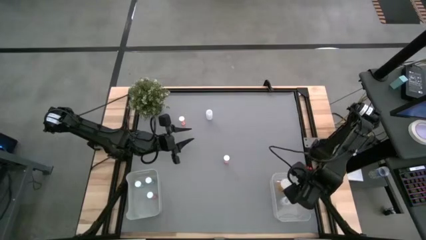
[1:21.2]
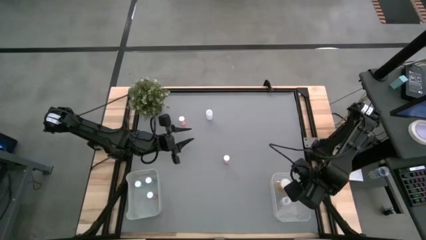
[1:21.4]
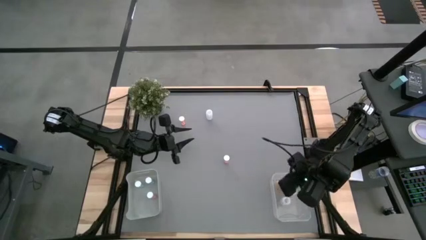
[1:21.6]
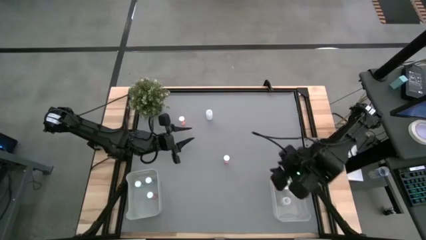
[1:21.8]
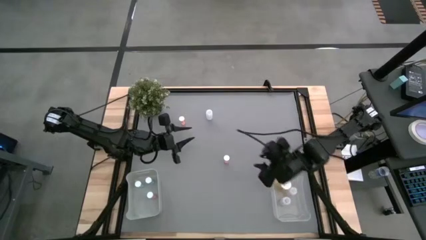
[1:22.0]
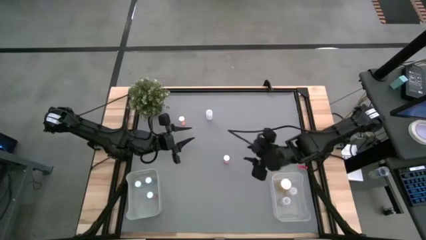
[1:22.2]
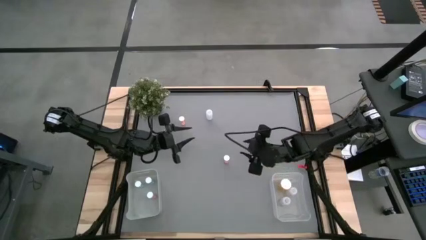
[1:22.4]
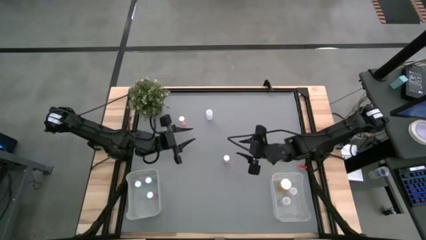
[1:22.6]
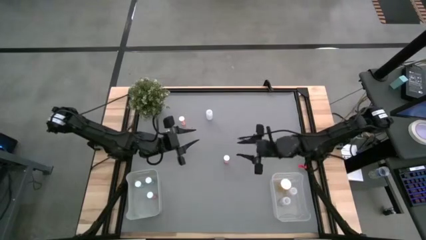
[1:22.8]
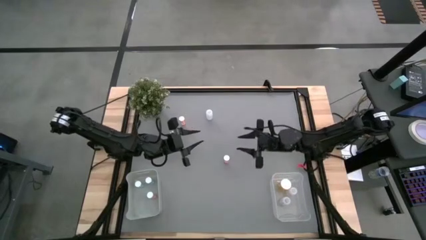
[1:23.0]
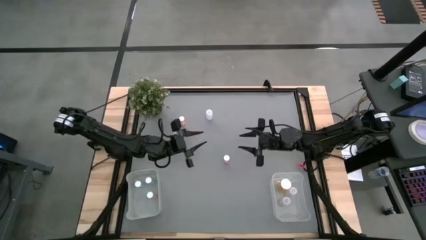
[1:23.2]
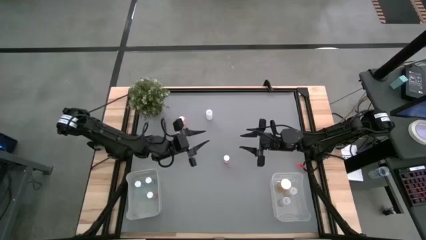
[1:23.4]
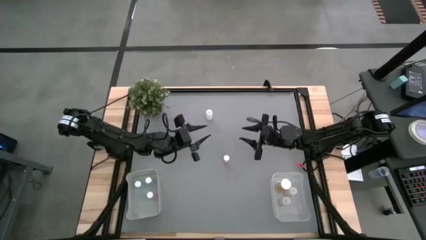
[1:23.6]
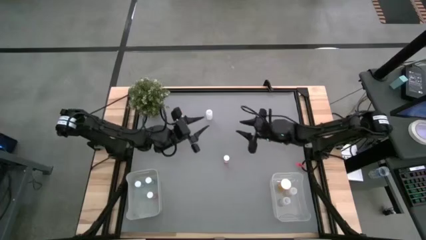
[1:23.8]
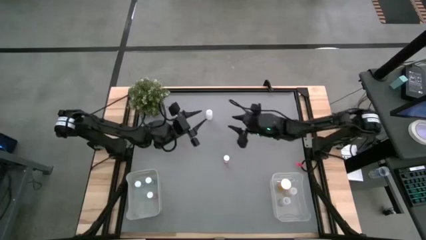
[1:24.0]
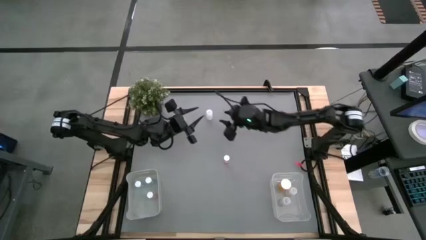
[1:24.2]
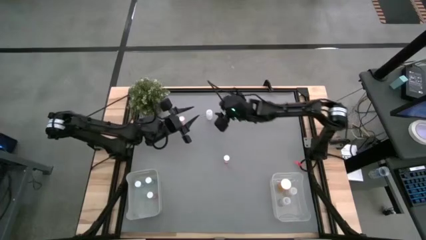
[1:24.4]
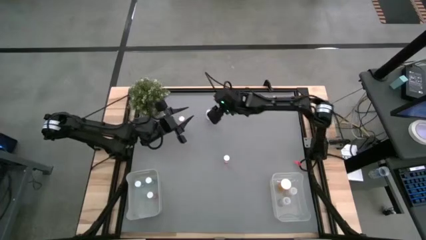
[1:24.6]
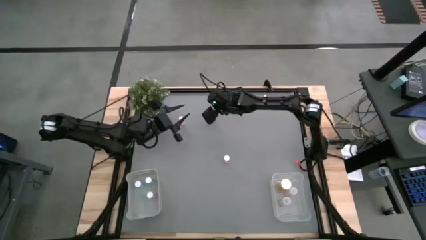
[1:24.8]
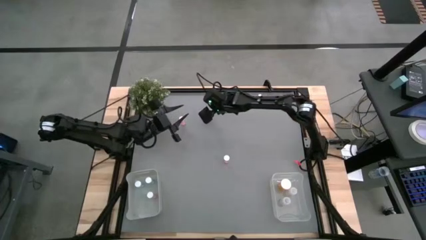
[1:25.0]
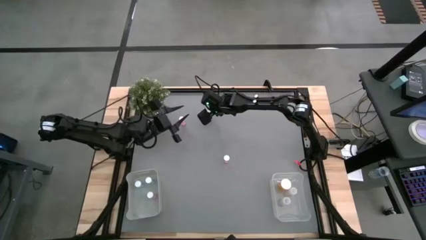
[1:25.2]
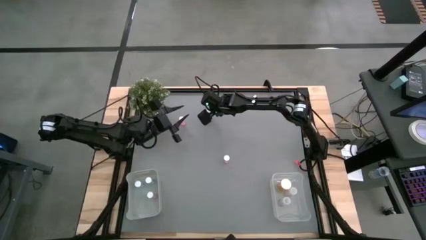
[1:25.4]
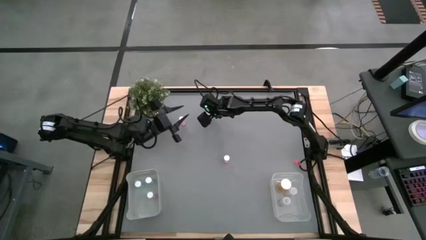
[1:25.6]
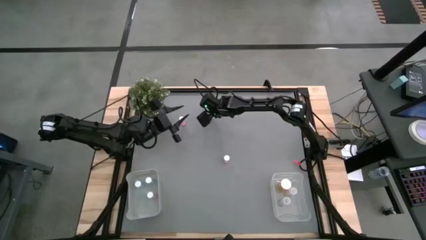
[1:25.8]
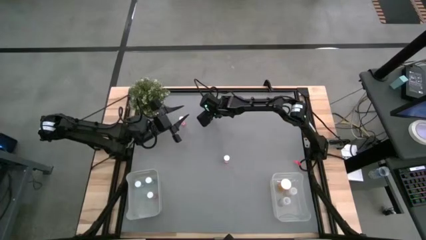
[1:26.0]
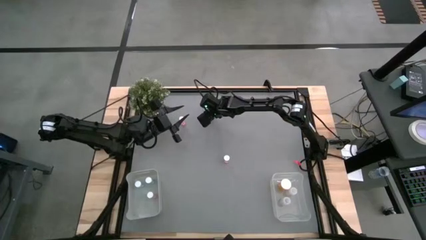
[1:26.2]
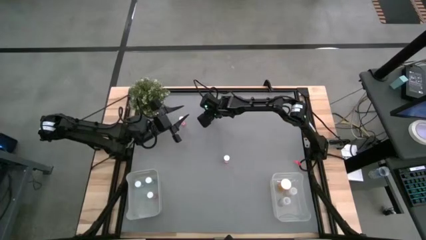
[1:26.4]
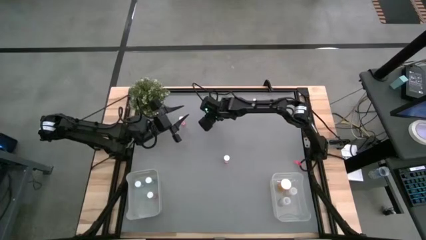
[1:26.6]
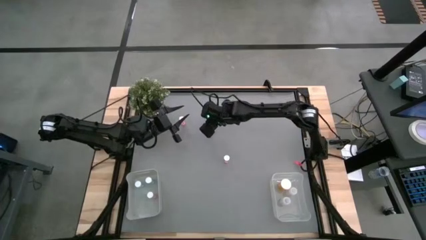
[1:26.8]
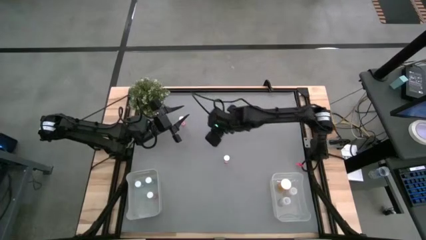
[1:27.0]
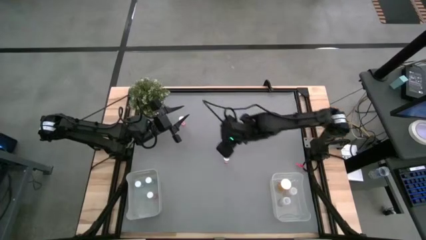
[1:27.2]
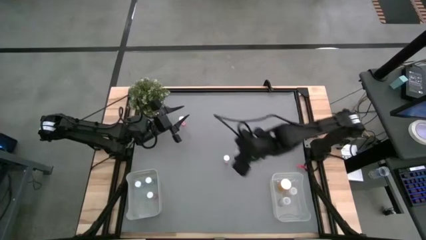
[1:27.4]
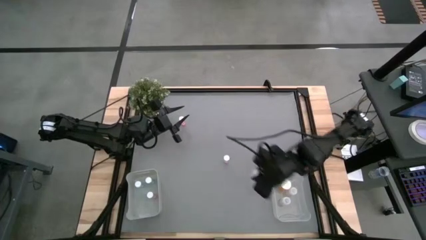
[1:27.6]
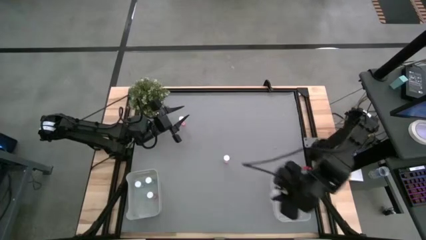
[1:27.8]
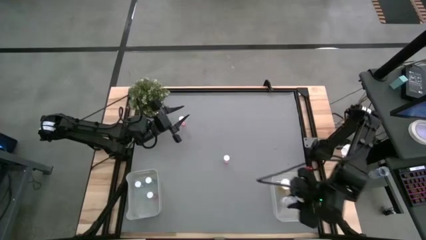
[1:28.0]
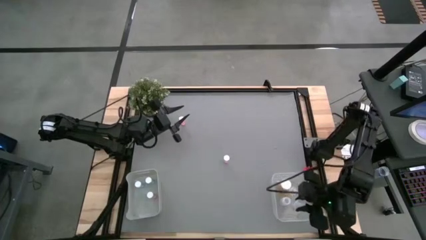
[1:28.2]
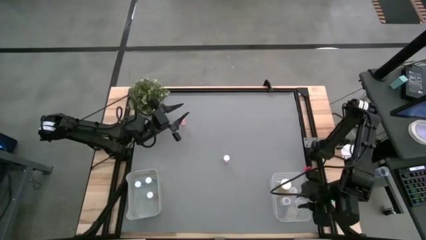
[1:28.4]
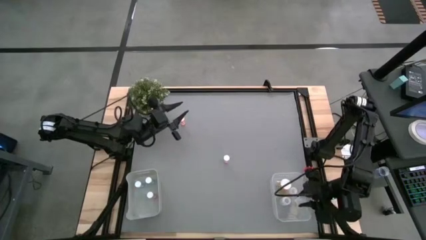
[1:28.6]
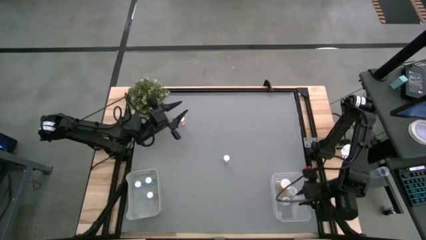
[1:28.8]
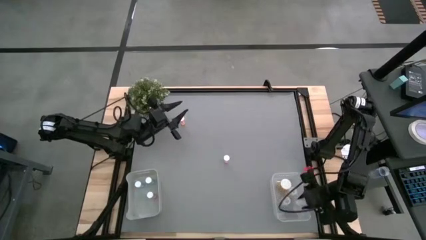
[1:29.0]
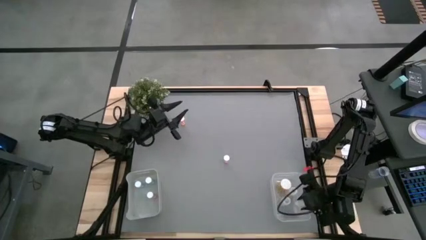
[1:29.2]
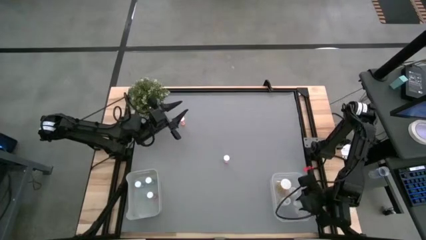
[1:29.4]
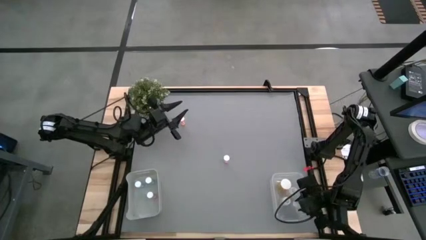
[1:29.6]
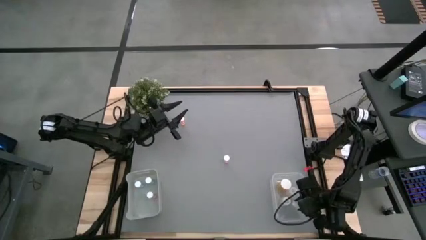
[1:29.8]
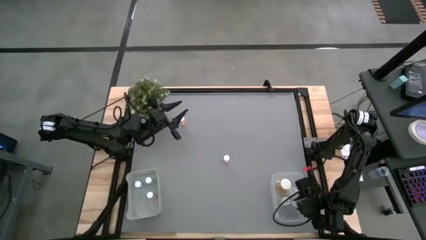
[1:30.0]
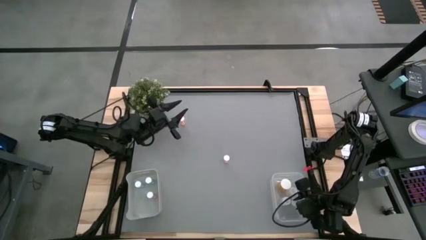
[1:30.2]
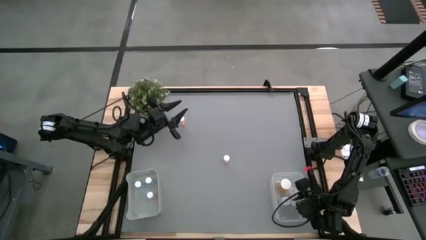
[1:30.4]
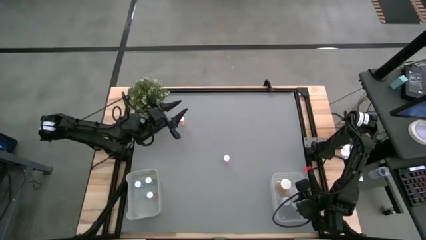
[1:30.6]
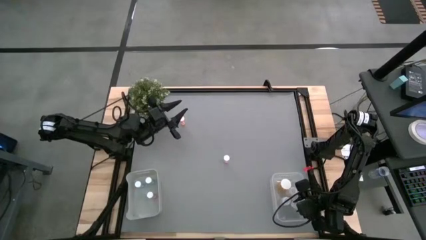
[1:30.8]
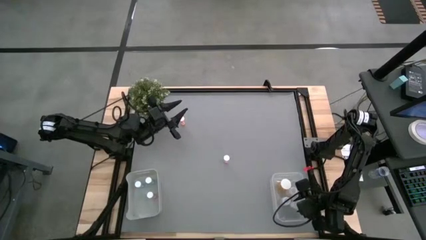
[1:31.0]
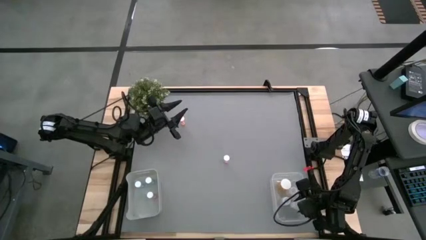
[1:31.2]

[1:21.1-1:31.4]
Task: Pick and place medicine bottles into bin by pill shape (circle, oval)
Put the white capsule bottle into the transparent bin

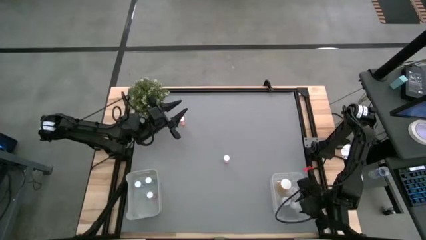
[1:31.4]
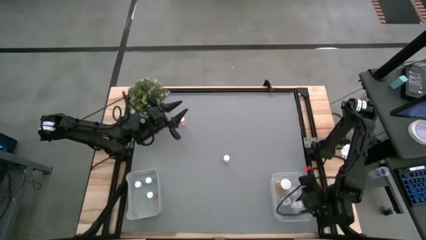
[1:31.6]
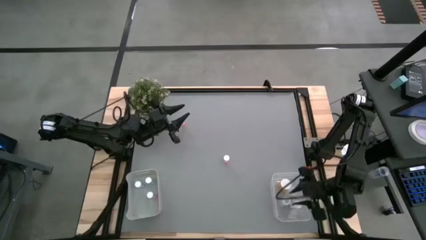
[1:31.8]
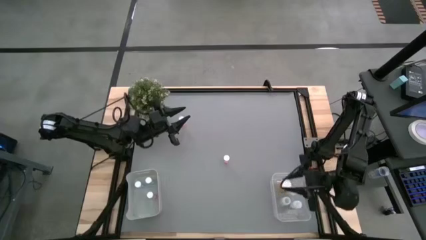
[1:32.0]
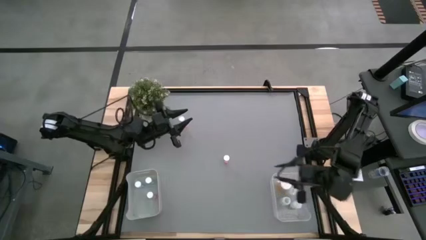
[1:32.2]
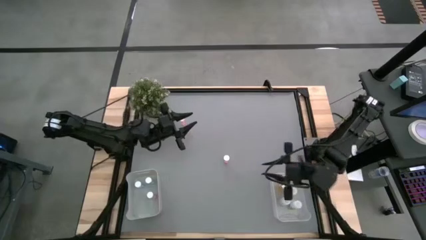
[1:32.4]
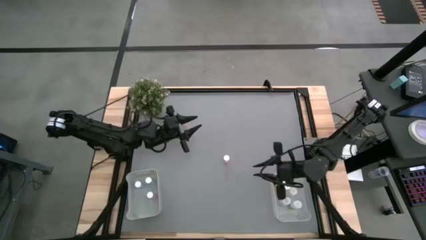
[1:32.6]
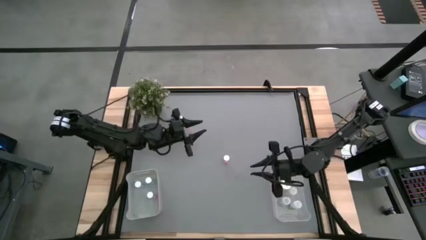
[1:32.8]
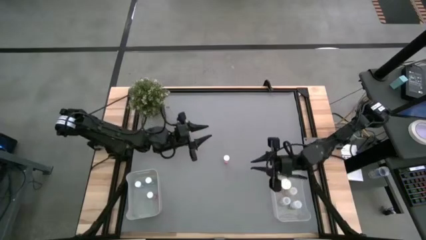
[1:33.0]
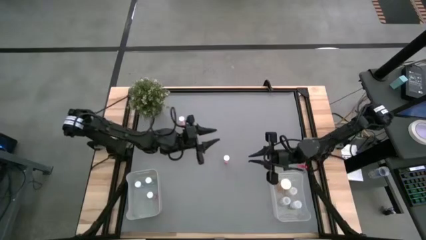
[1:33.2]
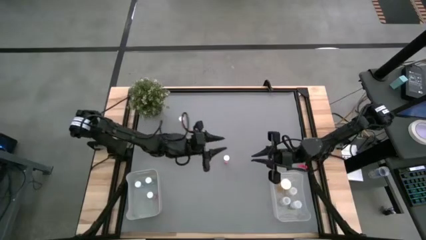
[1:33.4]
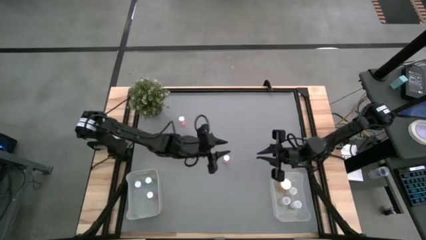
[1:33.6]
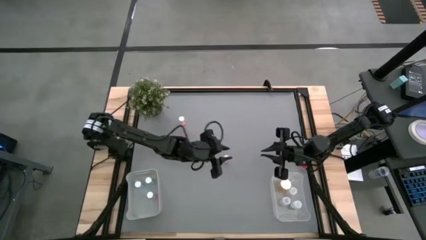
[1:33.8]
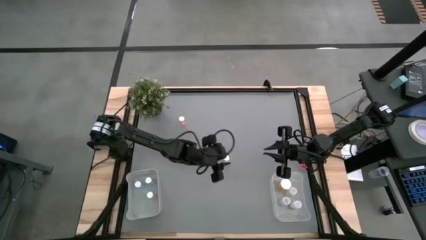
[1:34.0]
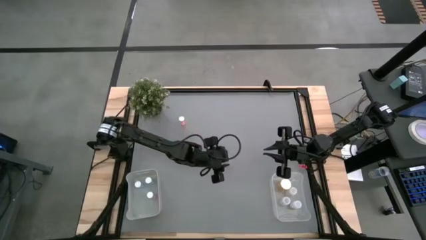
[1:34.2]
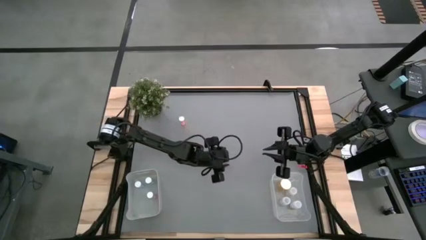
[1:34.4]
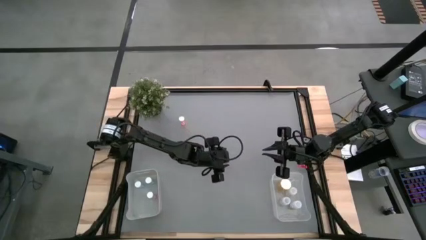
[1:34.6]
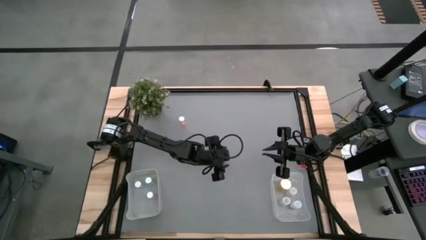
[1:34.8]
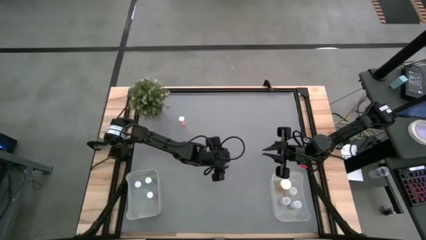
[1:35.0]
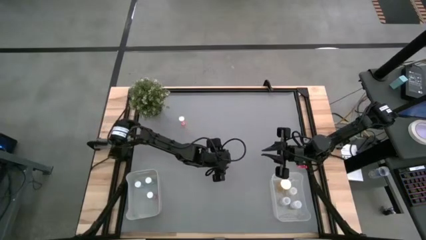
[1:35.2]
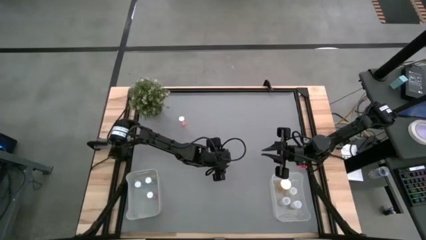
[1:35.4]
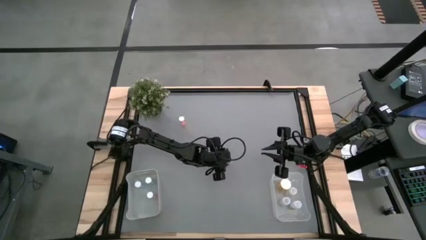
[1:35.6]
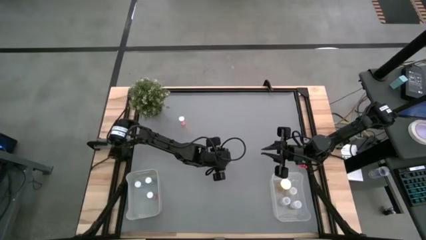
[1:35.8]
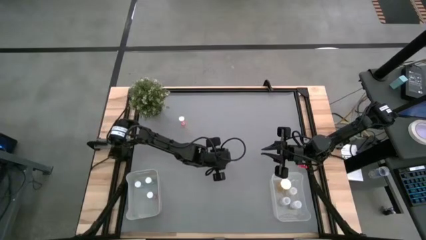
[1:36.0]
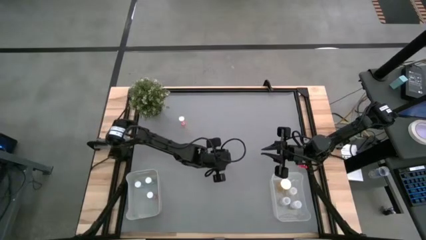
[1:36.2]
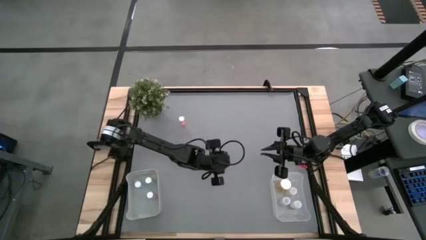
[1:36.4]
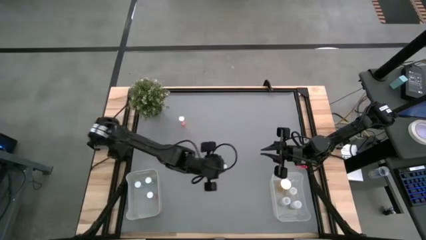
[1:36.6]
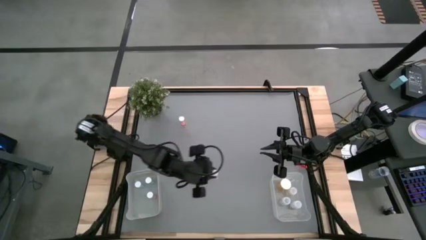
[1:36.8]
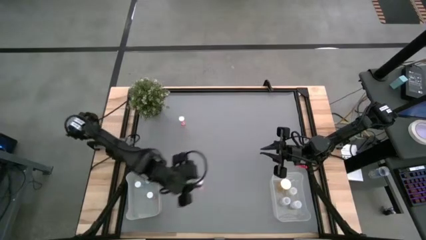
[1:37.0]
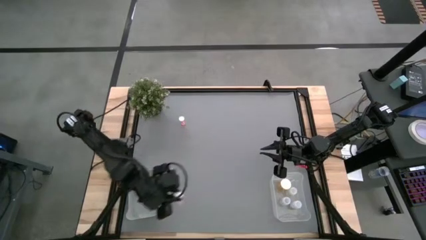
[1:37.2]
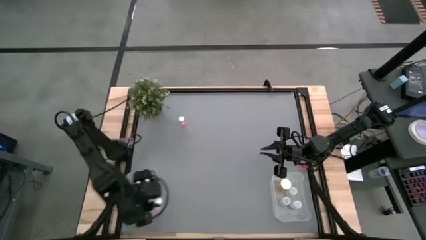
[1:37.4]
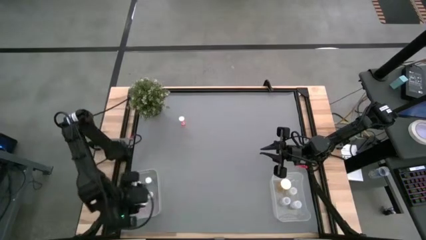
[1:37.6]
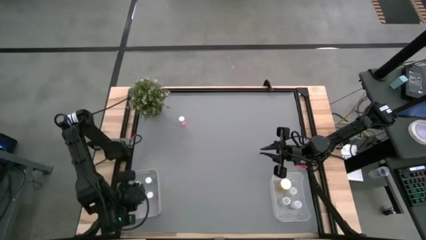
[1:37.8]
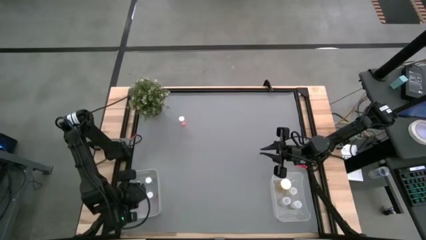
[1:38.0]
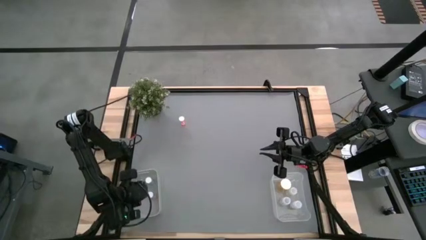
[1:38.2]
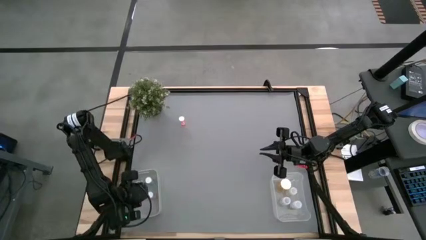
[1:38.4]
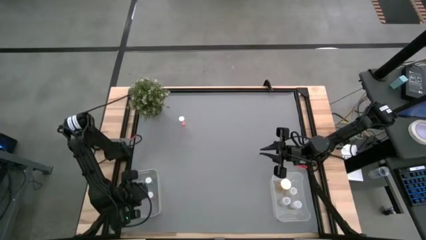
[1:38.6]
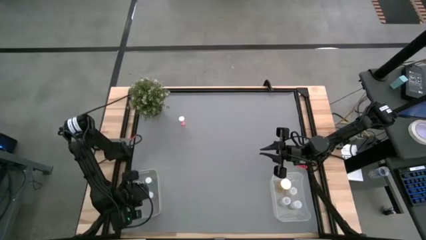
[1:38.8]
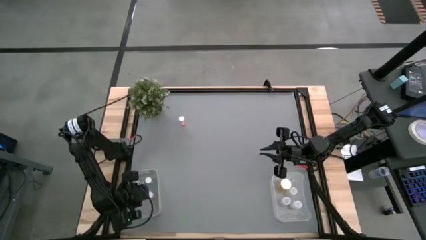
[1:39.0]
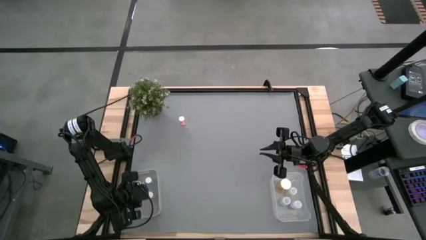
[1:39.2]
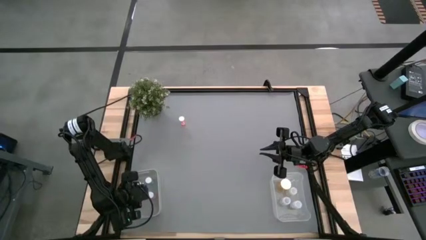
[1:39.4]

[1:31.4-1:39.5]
Put the pink tablet bottle into the gray bin
